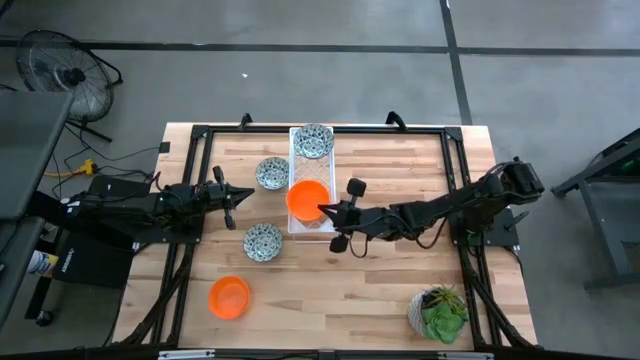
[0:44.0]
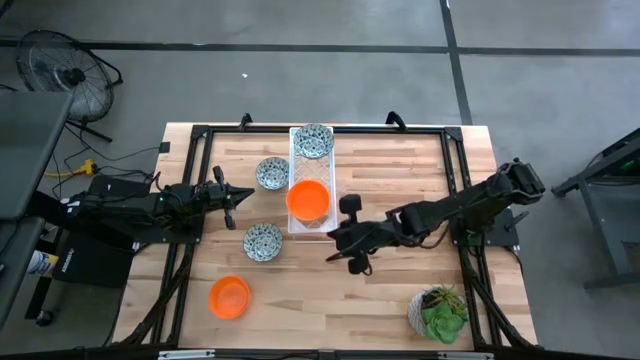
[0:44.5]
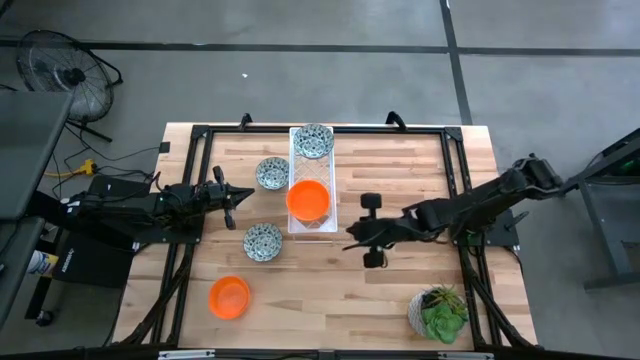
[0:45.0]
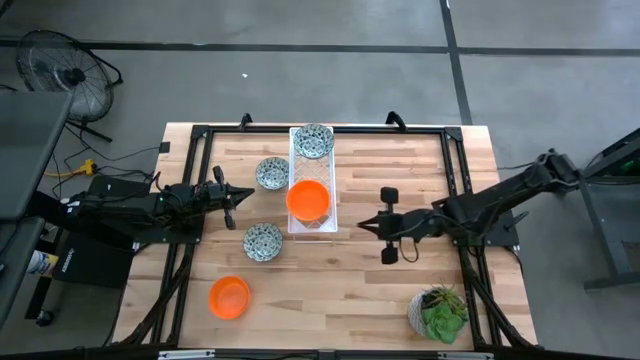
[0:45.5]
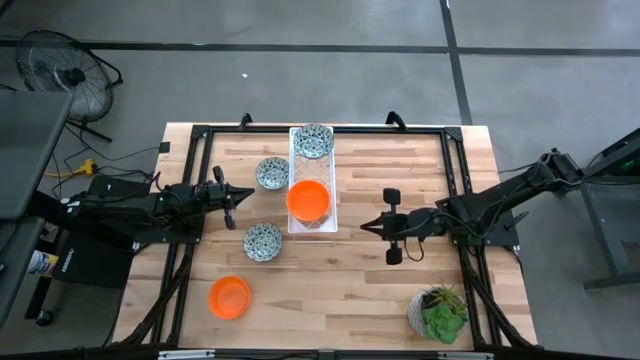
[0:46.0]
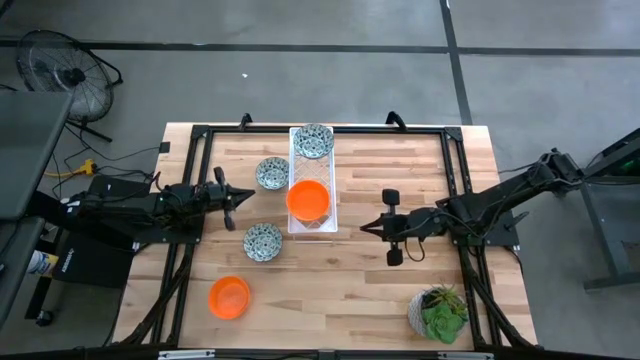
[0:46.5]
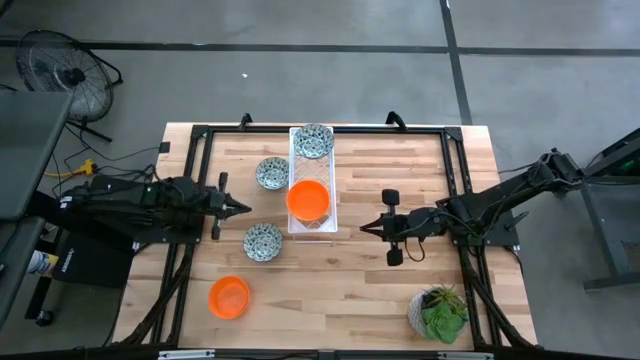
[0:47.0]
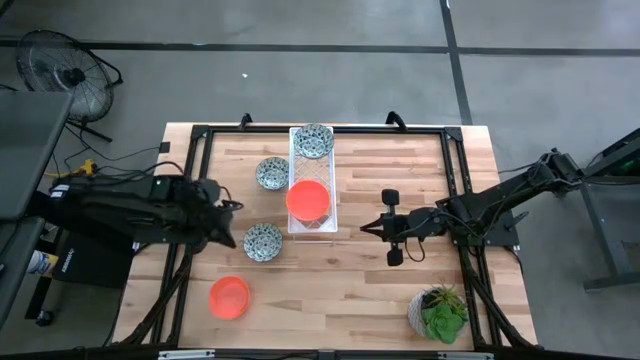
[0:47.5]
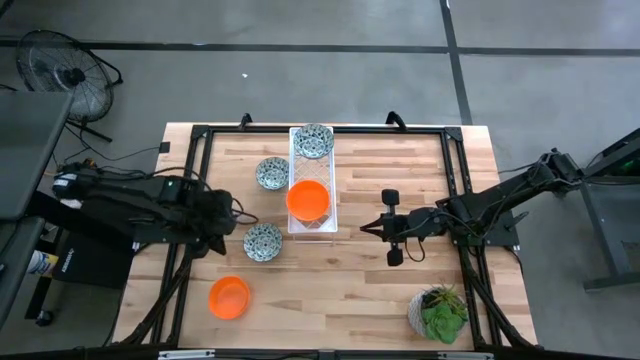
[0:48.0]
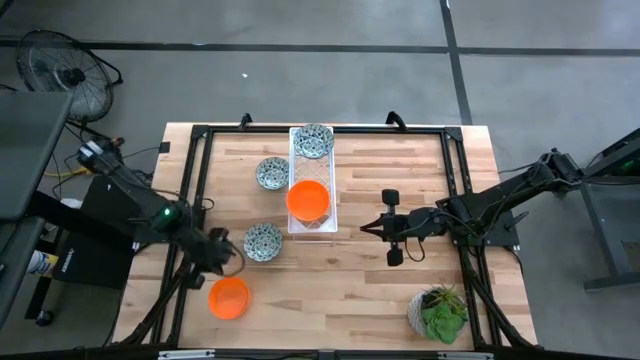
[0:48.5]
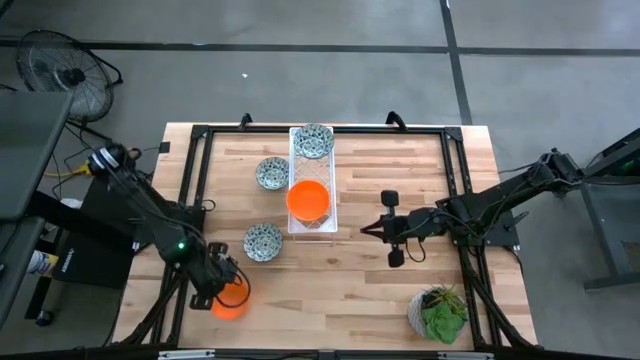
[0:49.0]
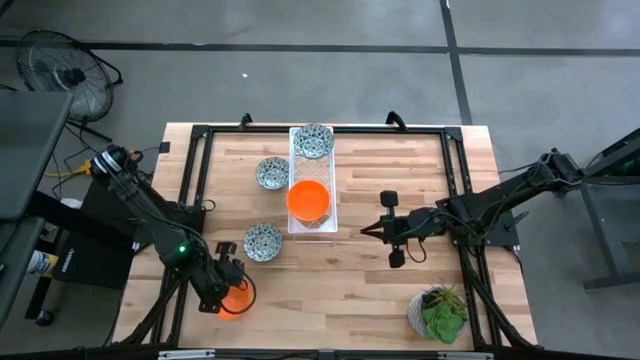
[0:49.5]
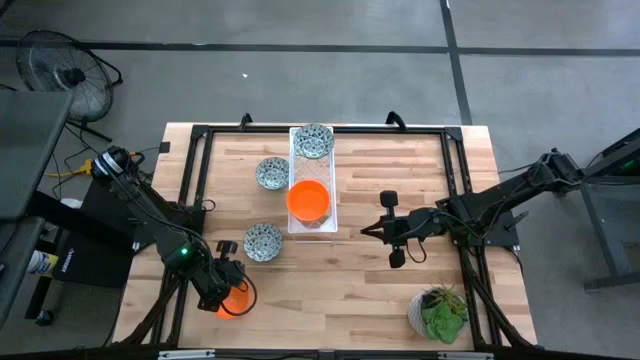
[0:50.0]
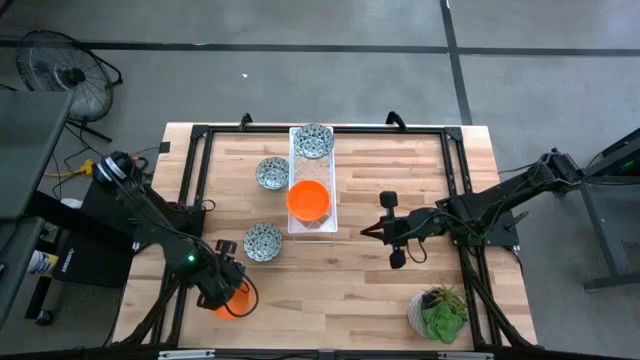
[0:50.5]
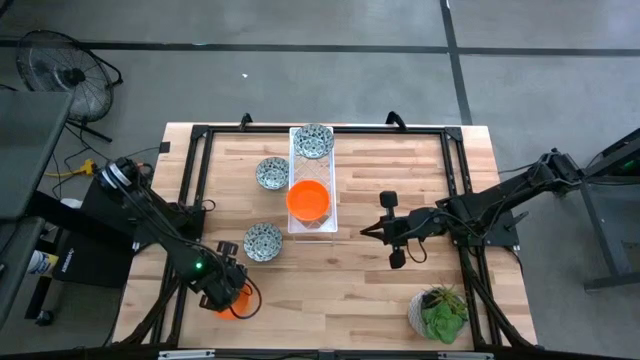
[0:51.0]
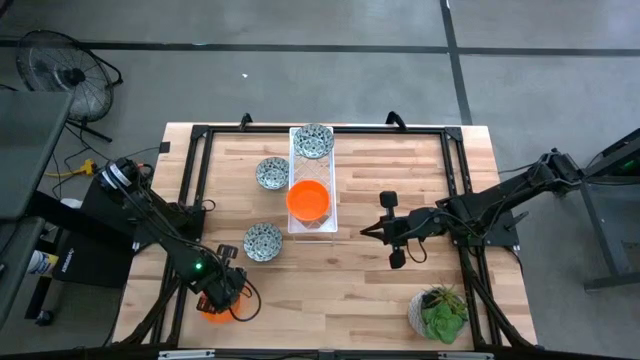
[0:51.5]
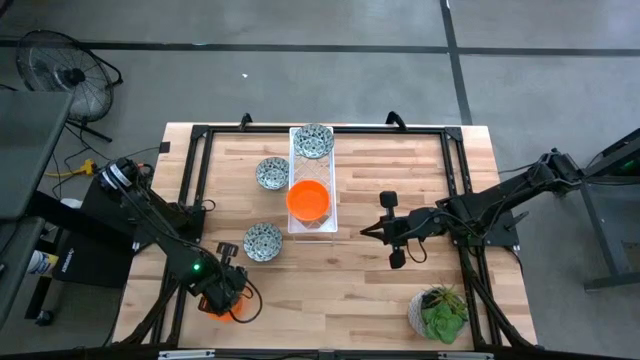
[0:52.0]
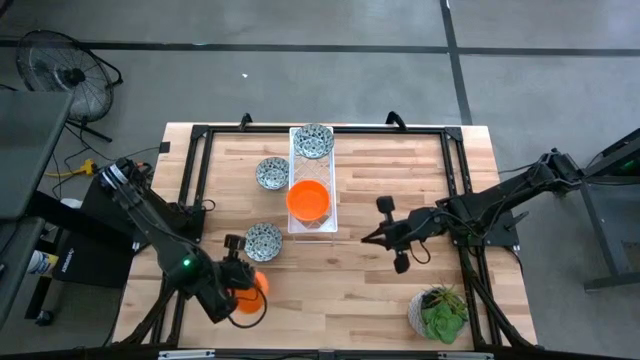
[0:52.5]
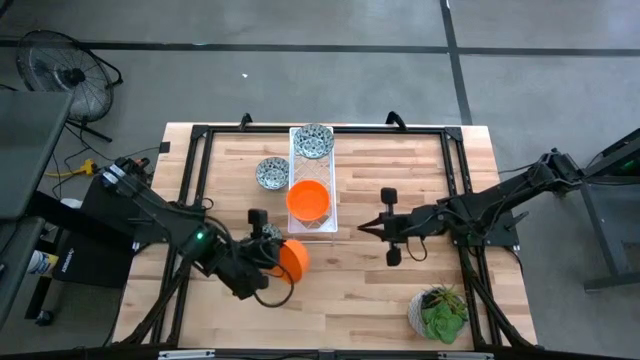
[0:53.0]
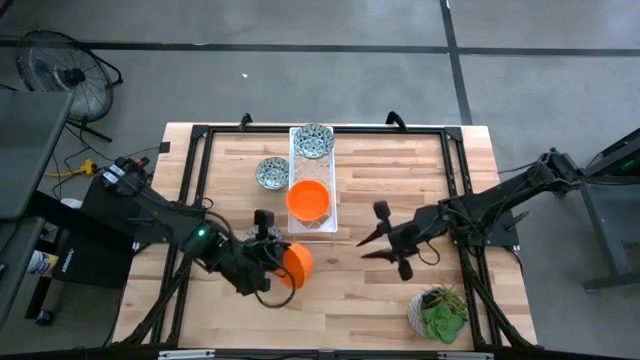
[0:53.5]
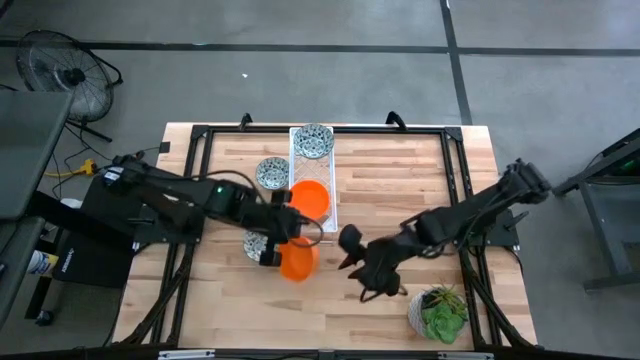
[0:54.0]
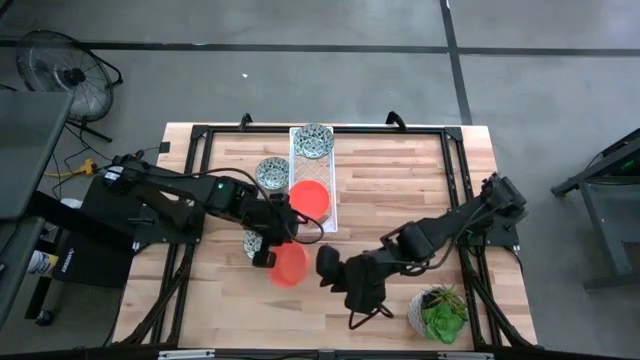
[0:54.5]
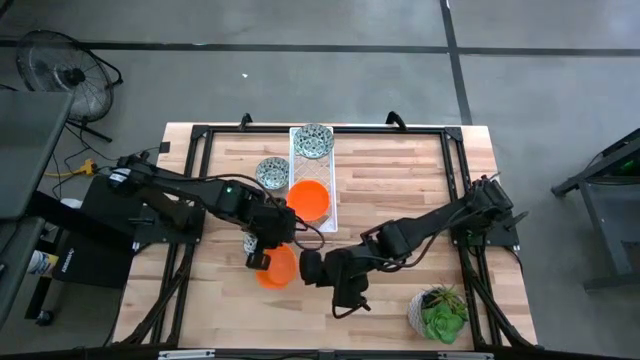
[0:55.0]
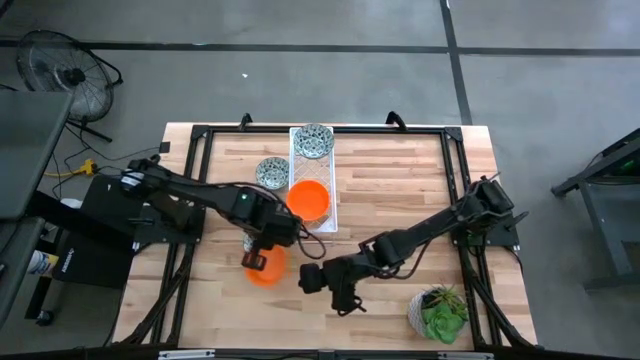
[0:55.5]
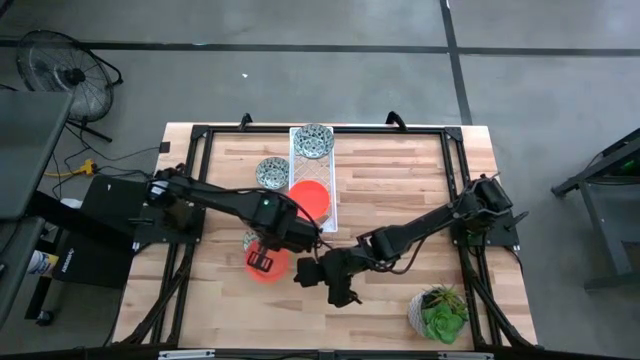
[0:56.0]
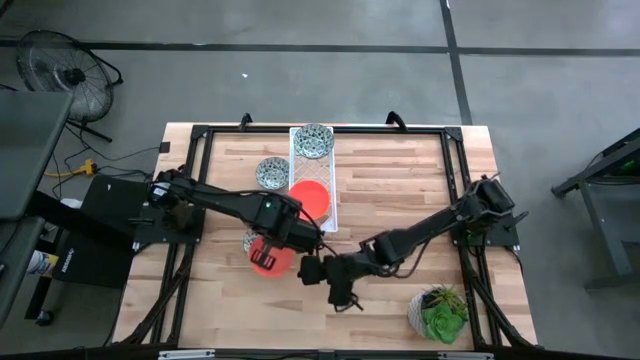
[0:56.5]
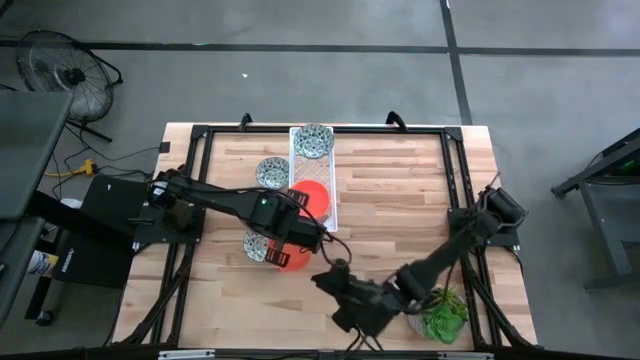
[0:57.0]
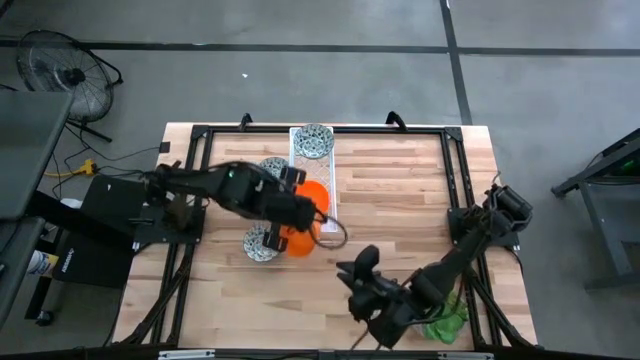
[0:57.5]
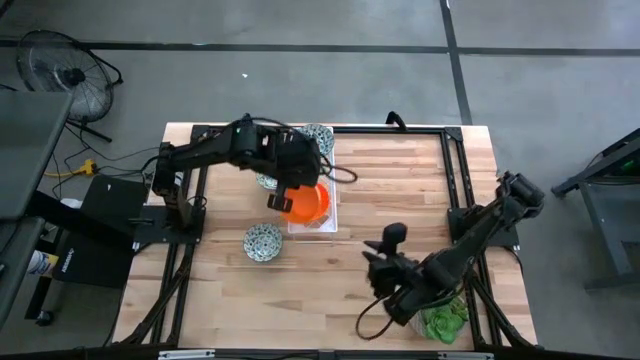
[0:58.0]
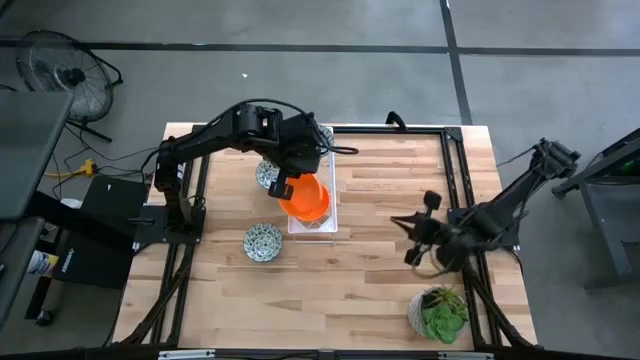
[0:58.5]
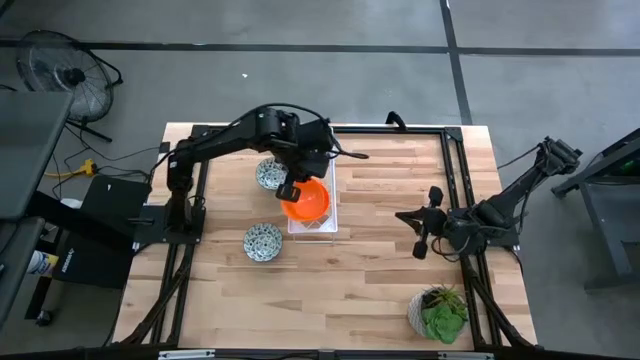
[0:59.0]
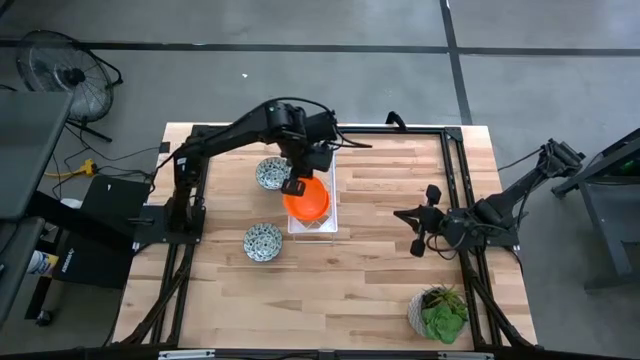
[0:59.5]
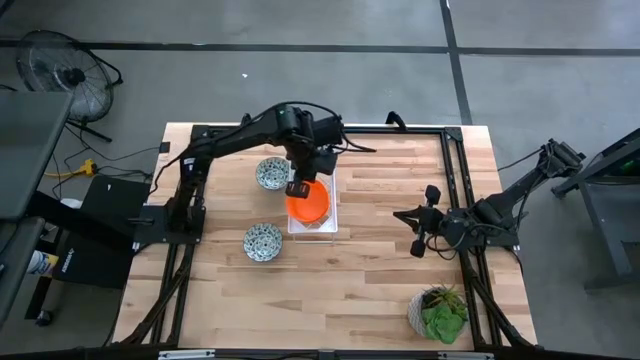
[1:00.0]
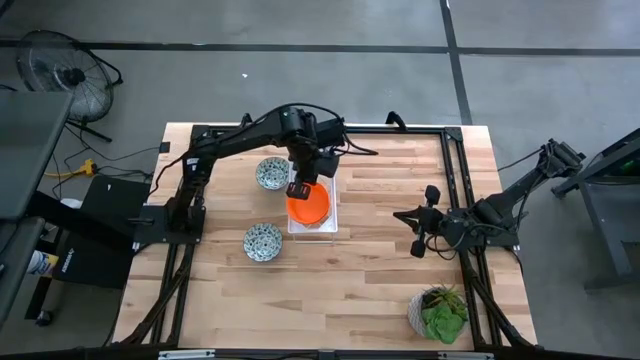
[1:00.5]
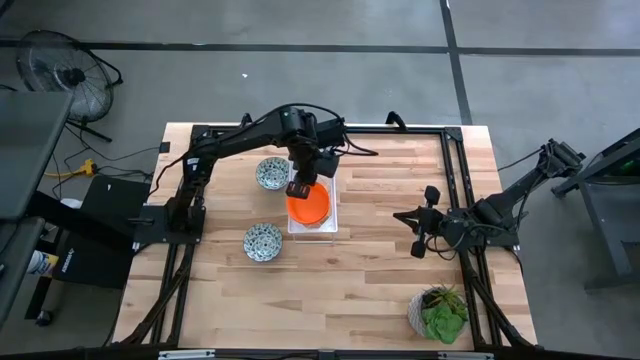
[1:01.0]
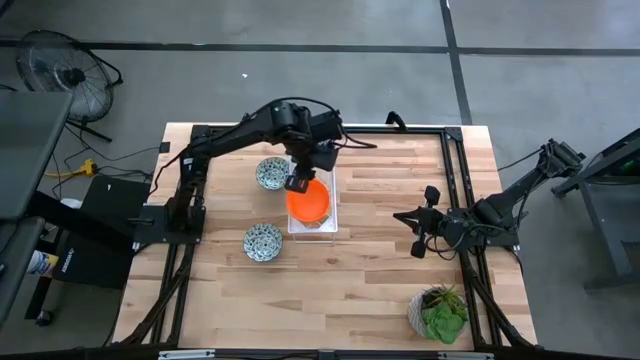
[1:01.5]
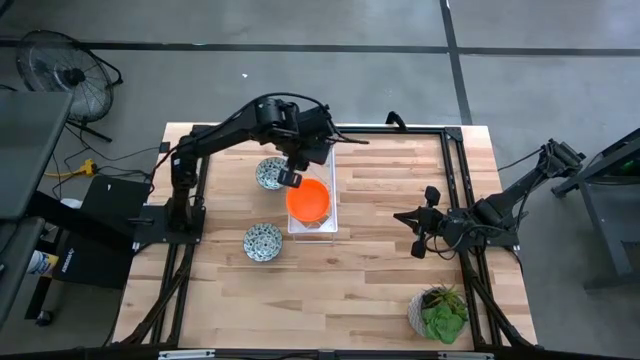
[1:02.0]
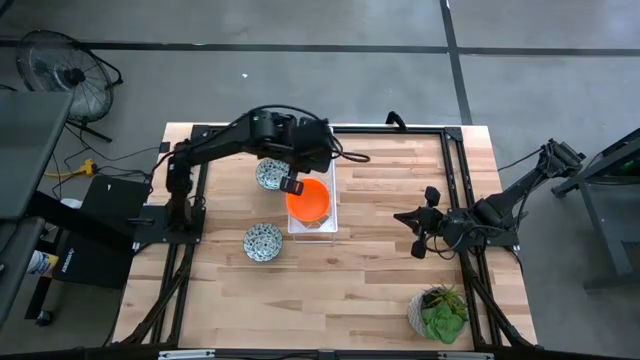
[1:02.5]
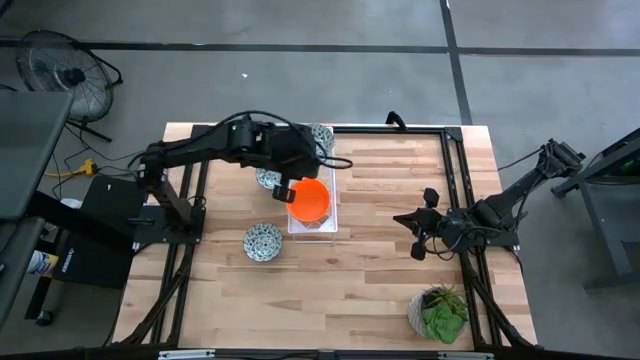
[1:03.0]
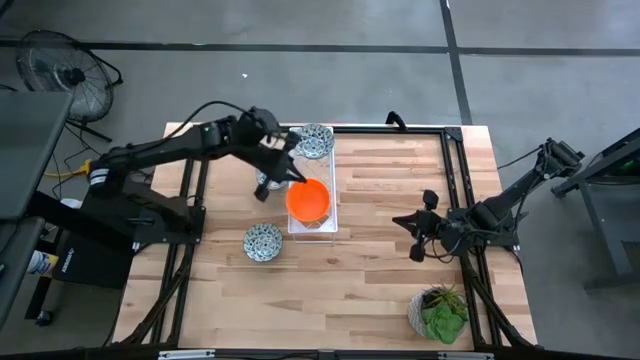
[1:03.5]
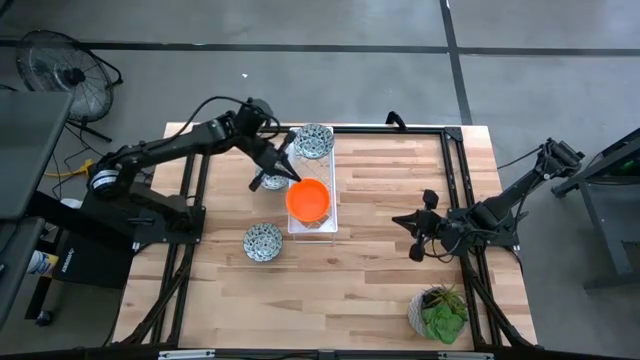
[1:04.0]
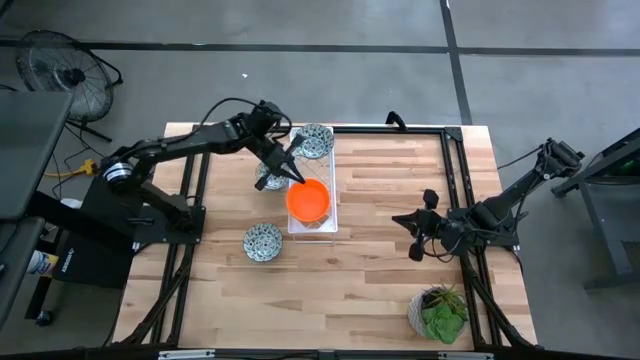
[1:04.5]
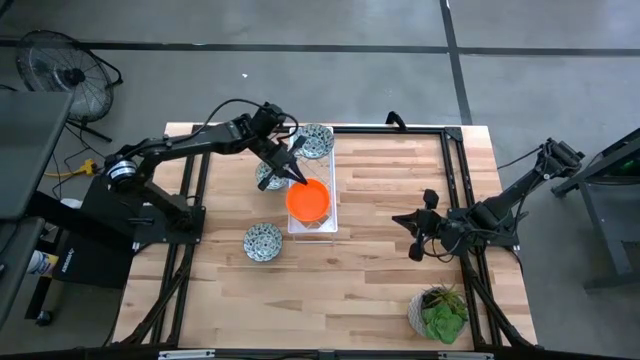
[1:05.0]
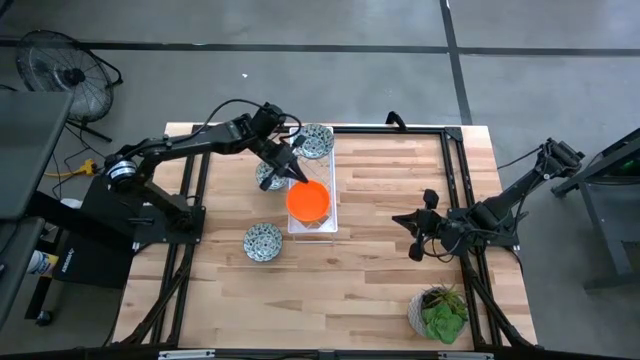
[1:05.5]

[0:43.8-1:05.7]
Task: Pick & Place Mini bowls
Stack the orange bowl on the orange bowls on the shelf
